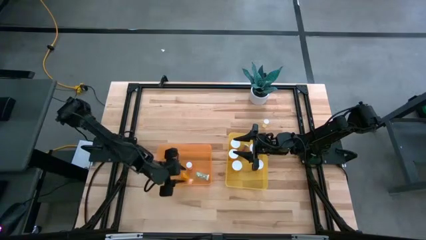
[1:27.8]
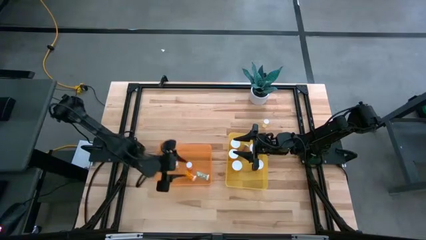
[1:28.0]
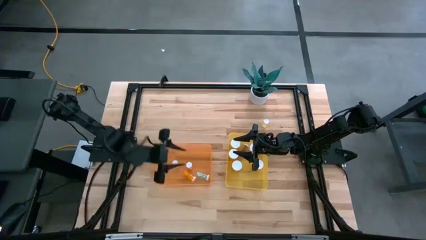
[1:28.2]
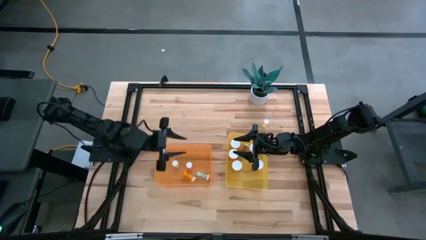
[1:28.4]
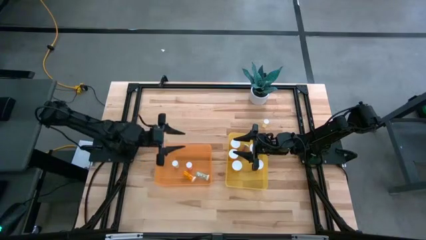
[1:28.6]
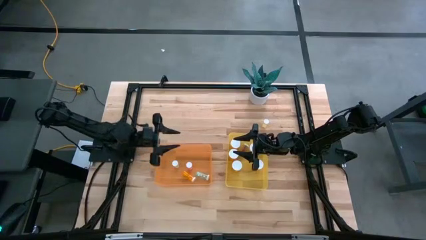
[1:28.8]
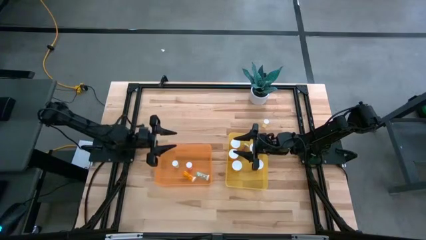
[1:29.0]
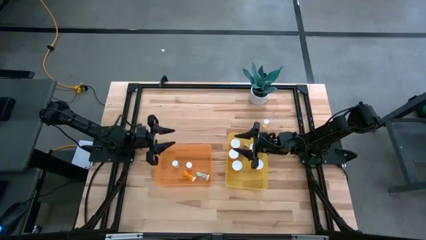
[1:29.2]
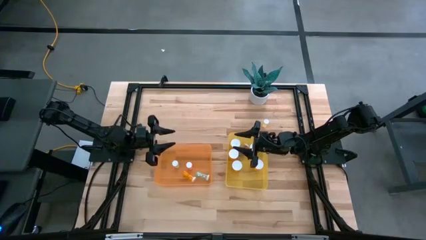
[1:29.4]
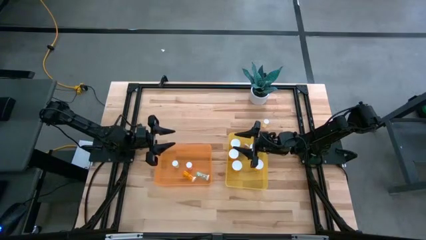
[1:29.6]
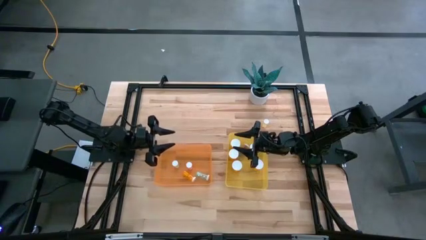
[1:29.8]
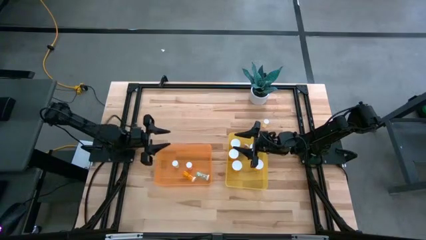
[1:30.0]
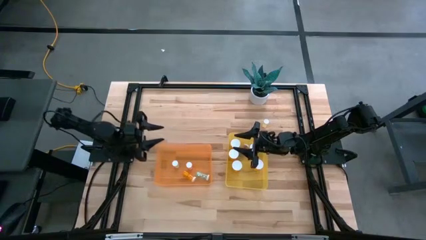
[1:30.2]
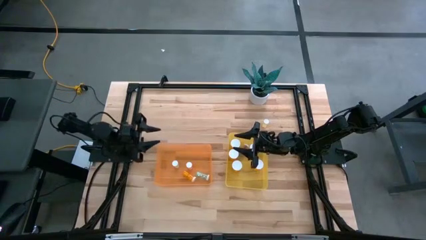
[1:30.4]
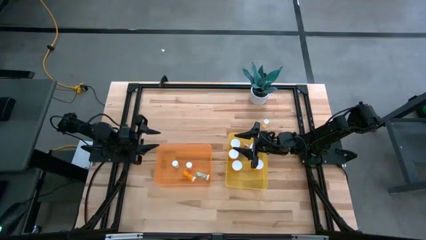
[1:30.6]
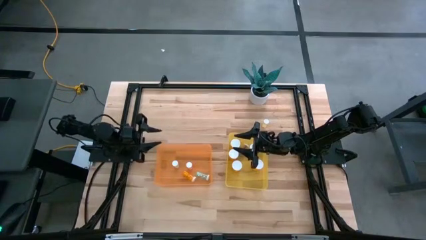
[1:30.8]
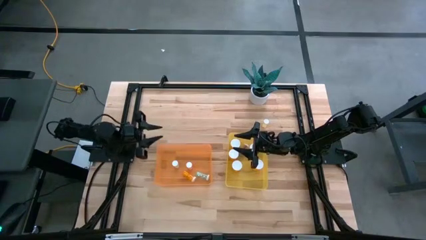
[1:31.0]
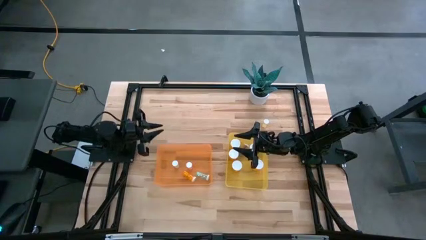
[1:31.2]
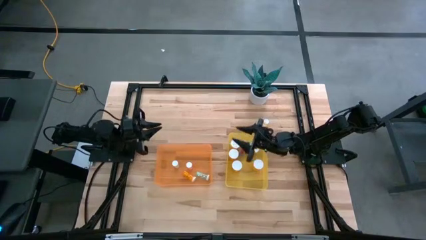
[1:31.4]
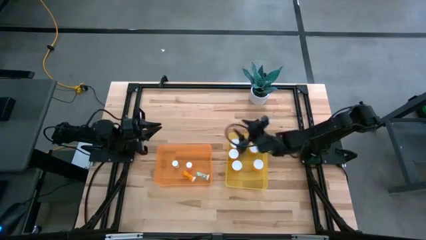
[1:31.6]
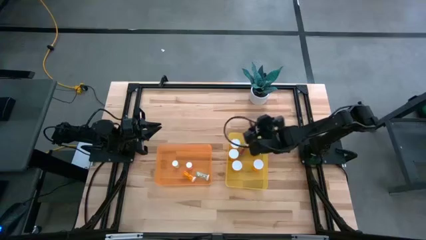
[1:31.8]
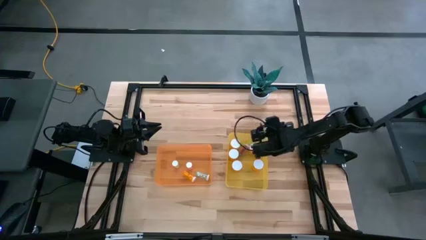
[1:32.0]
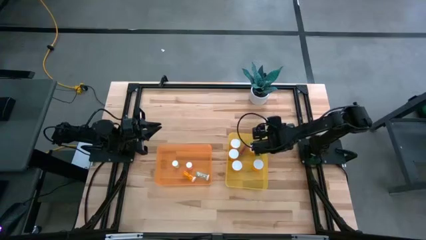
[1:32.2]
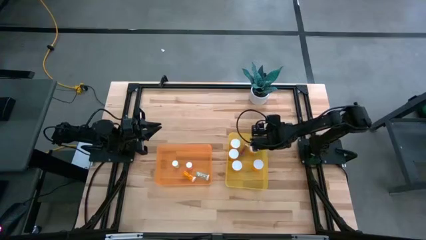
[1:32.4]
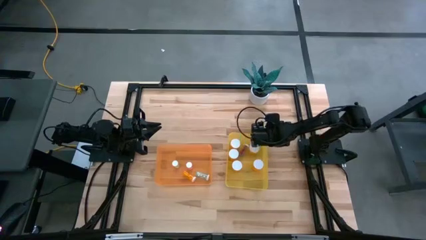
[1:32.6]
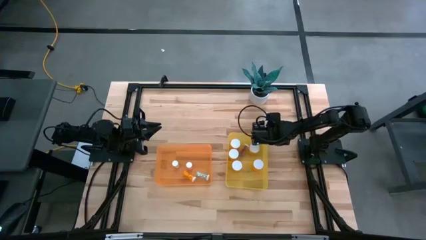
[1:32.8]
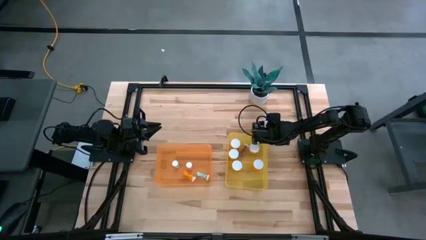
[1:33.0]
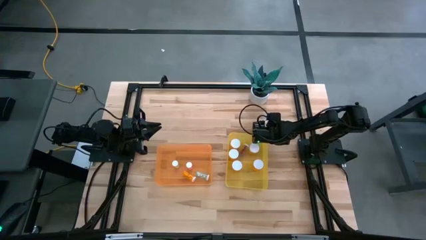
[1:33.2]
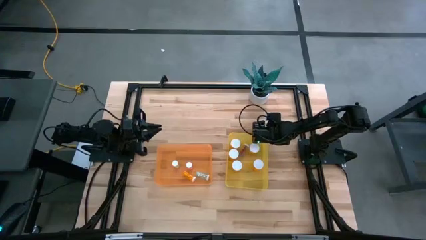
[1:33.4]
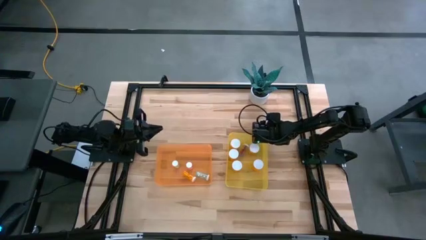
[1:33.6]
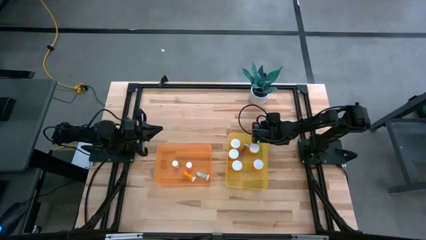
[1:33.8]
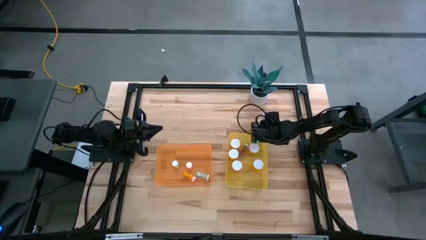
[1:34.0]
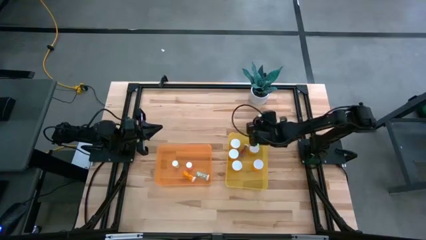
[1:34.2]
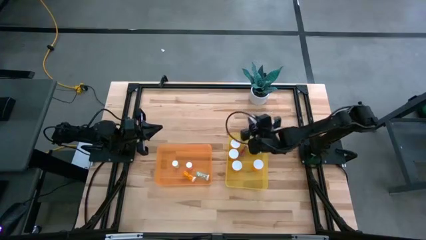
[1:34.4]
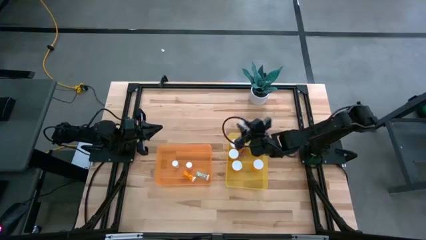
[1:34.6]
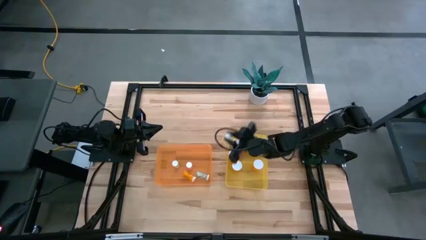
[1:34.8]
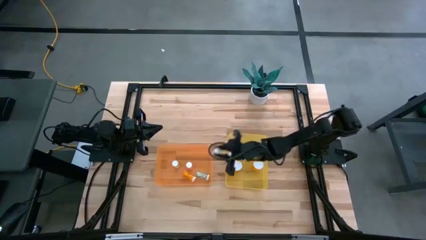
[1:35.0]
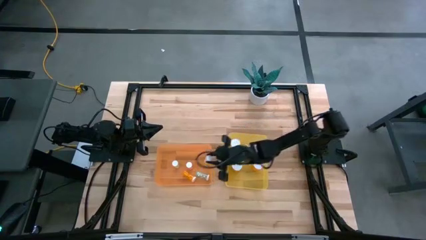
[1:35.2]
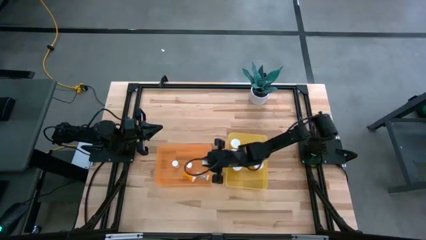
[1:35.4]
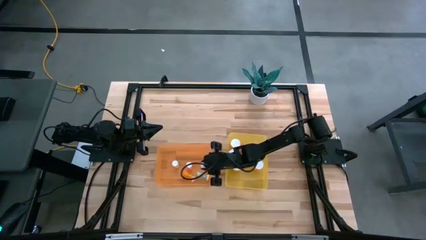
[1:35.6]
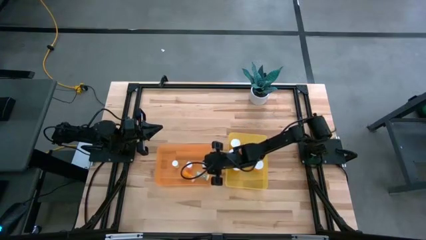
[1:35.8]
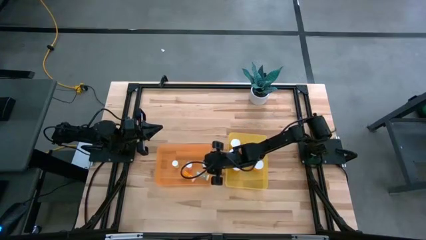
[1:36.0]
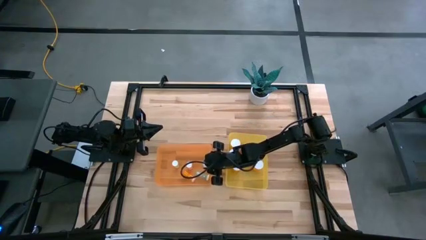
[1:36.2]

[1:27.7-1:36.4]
Task: Pick and place medicine bottles into bin by pill shape (circle, oval)
Put the yellow tablet bottle into the orange bin

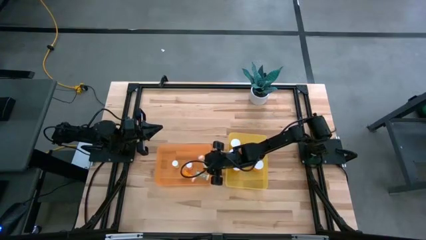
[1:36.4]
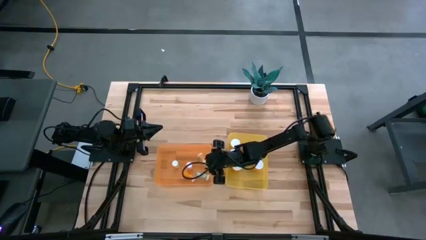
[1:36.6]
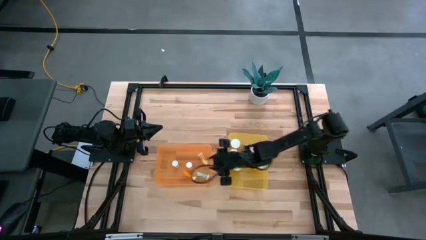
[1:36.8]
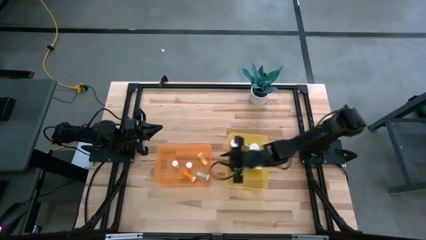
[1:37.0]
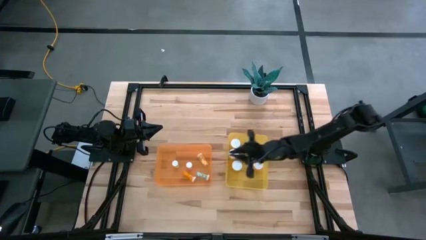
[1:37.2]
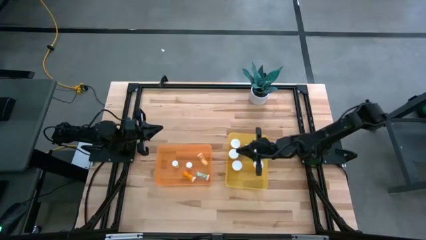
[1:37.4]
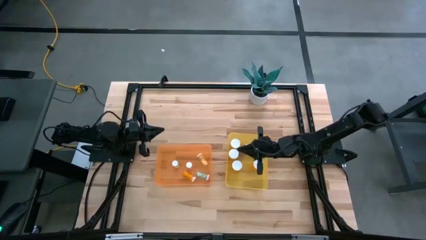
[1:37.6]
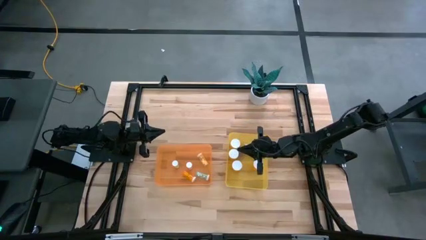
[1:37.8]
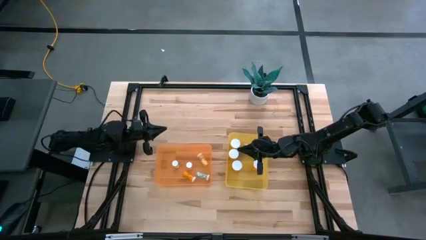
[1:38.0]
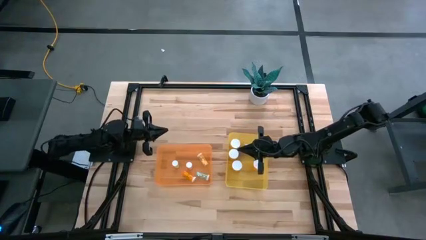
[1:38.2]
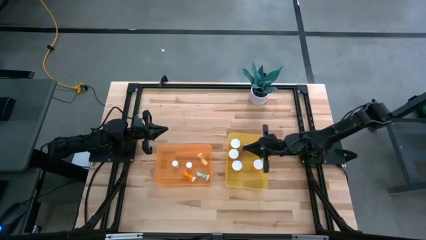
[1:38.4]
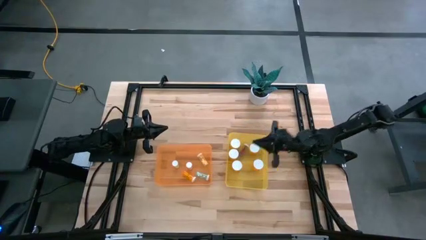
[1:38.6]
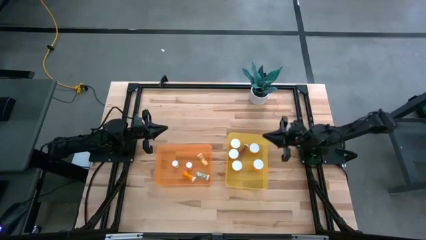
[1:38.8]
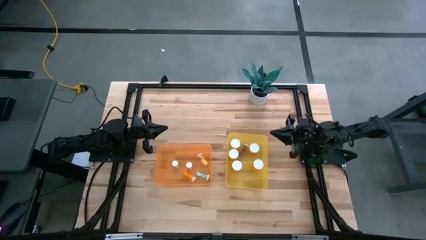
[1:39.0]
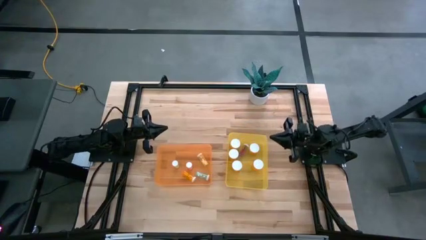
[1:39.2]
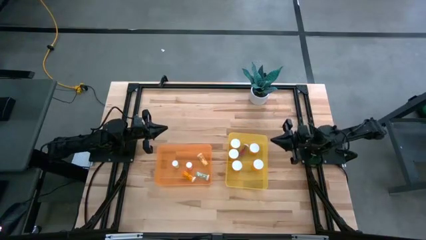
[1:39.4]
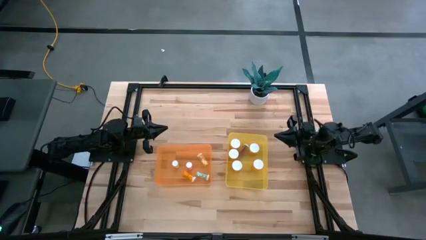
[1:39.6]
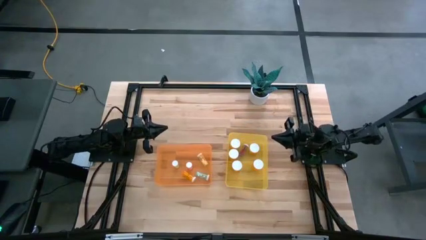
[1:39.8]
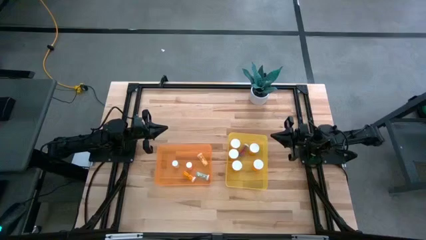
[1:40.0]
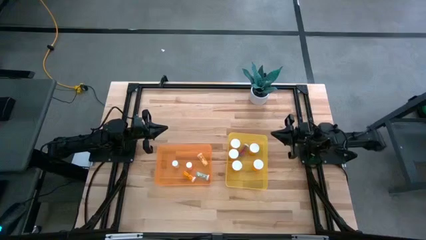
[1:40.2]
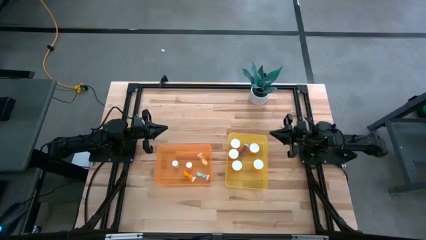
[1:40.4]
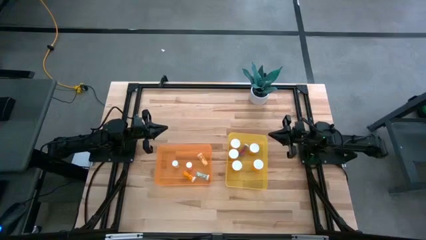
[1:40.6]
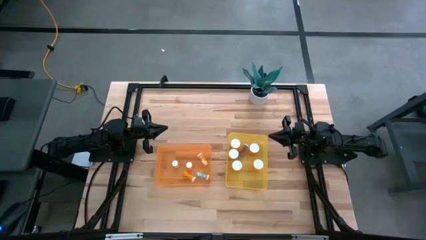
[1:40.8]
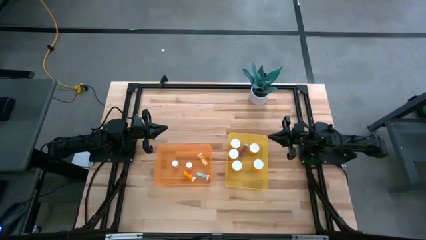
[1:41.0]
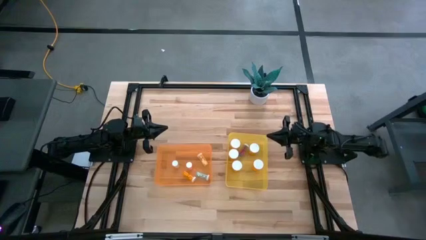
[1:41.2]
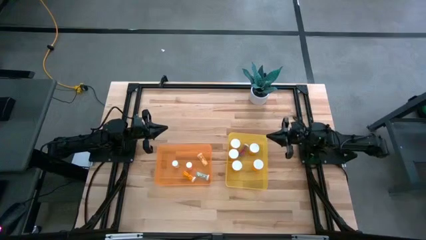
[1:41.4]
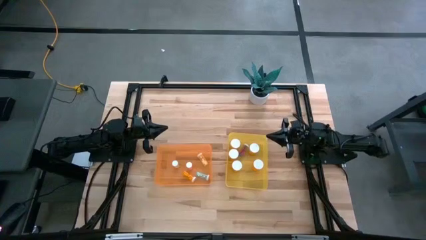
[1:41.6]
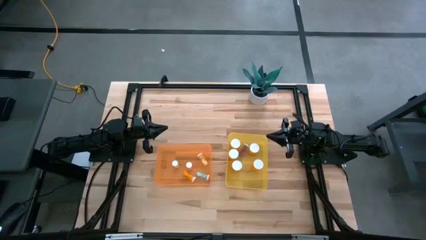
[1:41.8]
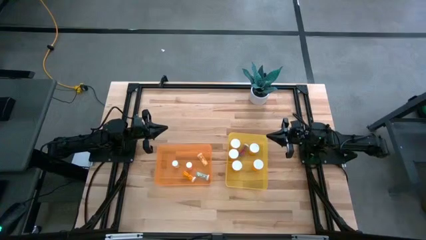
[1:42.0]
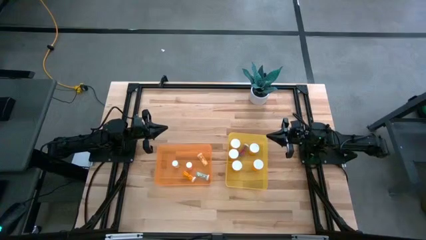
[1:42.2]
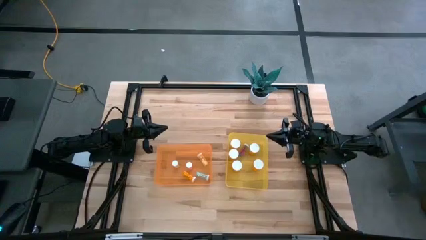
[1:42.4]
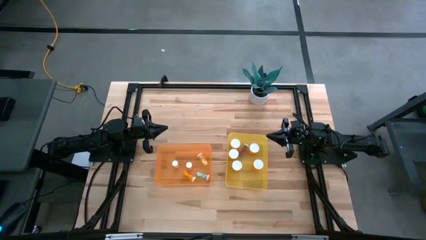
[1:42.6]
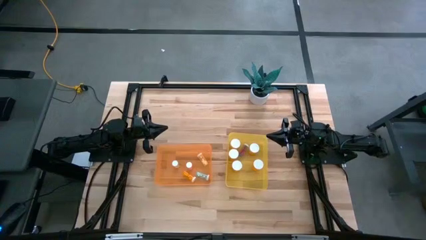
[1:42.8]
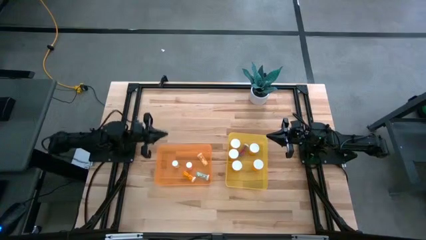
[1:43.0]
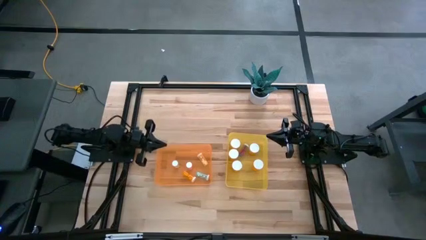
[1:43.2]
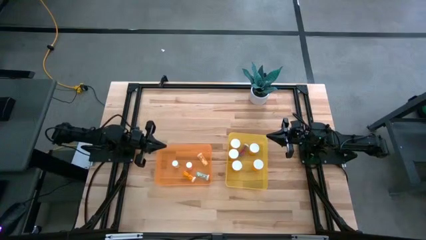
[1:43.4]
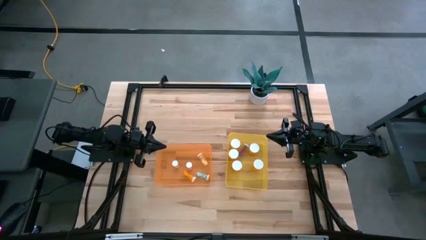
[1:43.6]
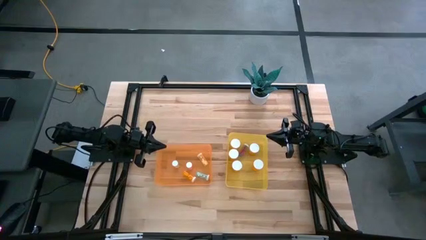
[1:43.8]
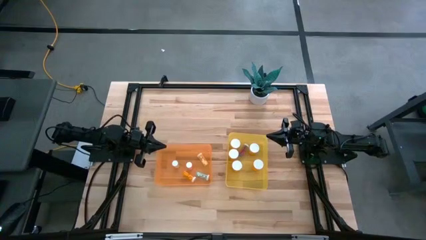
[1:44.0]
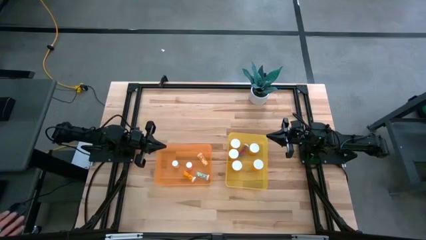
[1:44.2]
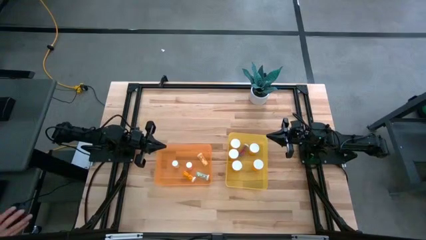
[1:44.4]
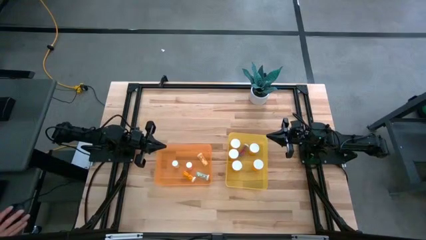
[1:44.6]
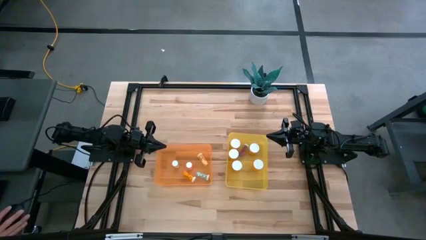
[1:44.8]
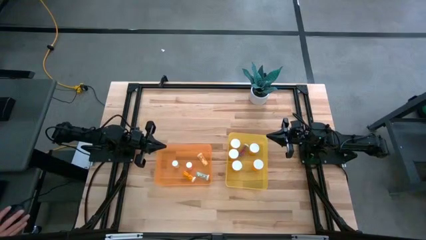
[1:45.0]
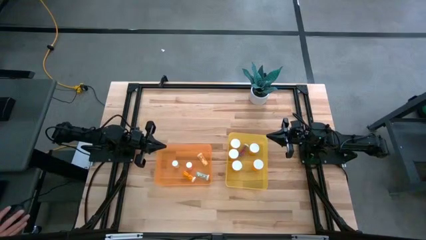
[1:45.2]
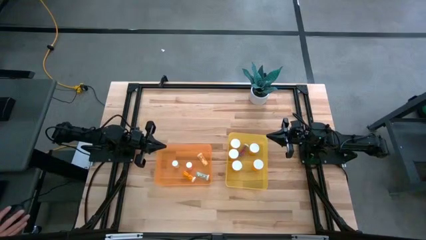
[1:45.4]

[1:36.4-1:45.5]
Return to Home Position
